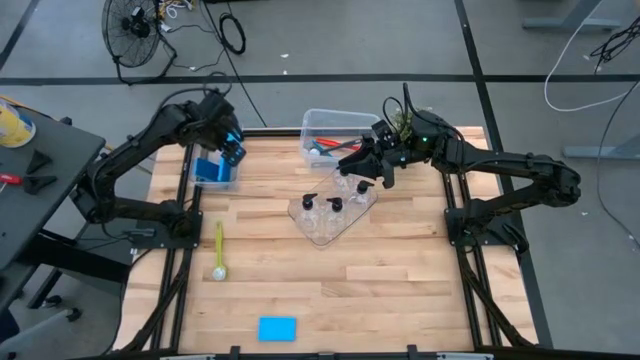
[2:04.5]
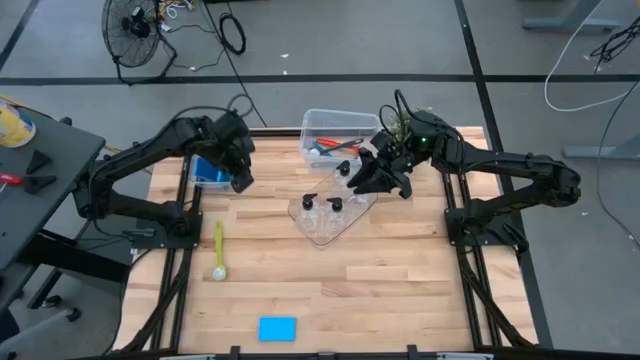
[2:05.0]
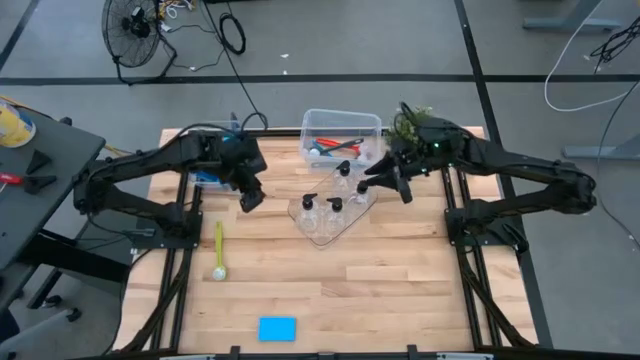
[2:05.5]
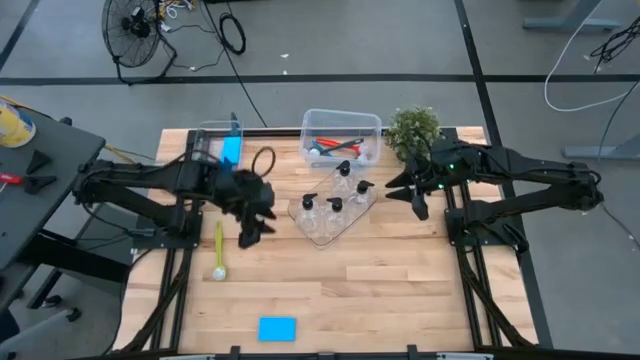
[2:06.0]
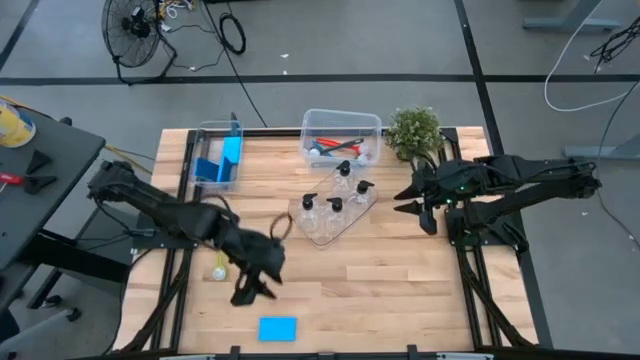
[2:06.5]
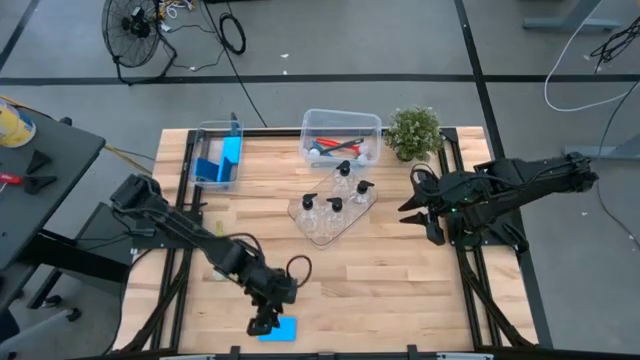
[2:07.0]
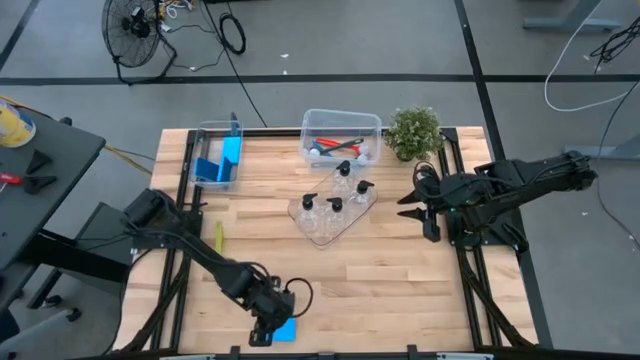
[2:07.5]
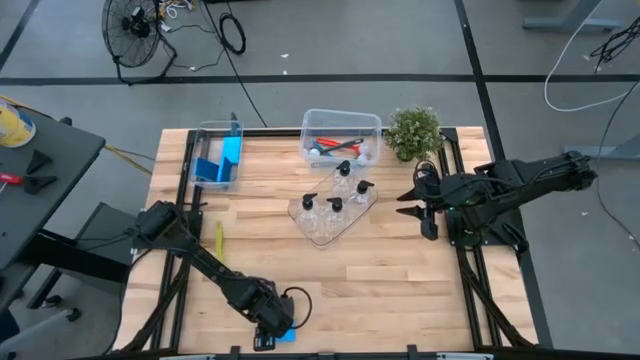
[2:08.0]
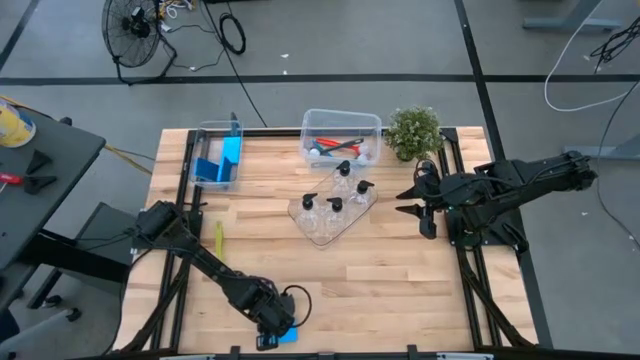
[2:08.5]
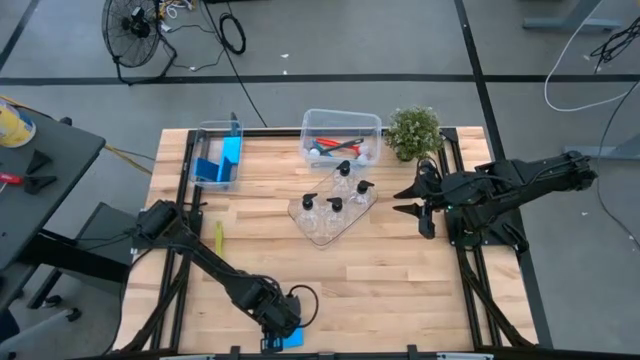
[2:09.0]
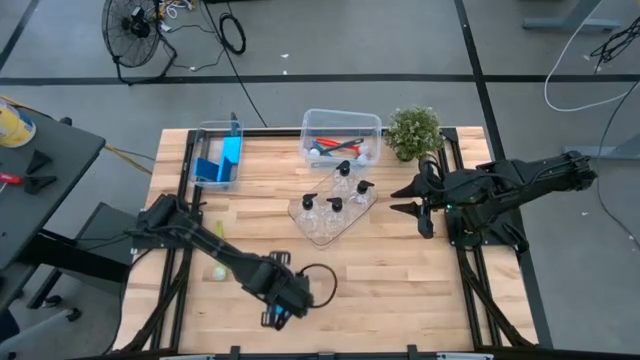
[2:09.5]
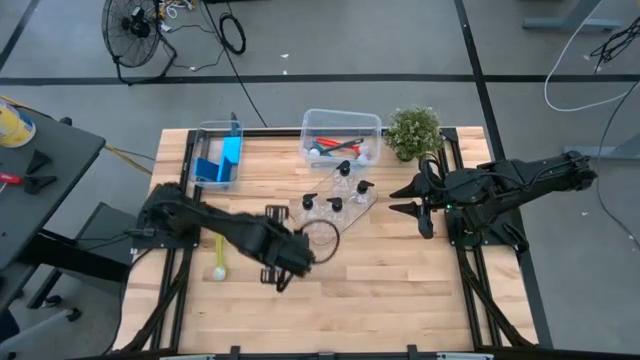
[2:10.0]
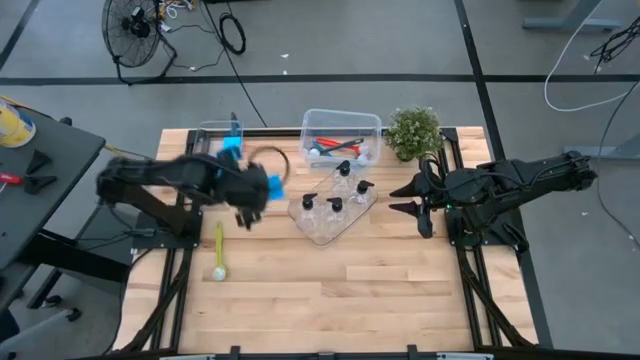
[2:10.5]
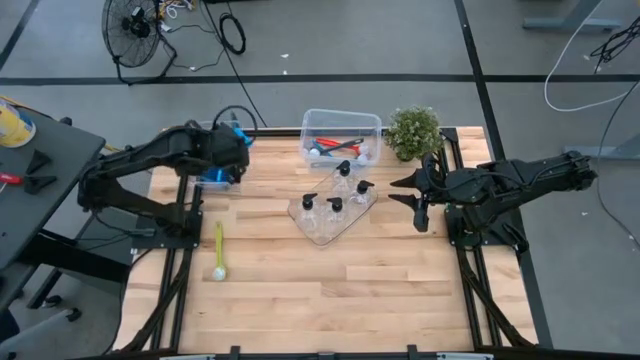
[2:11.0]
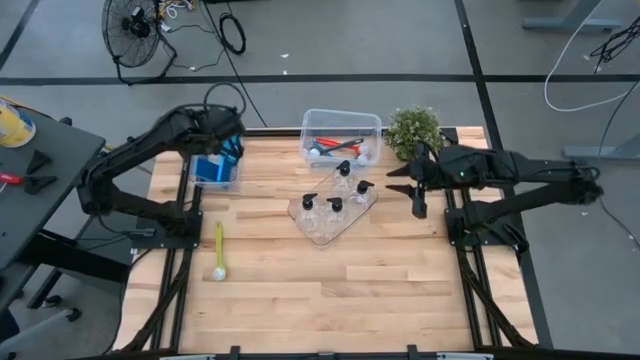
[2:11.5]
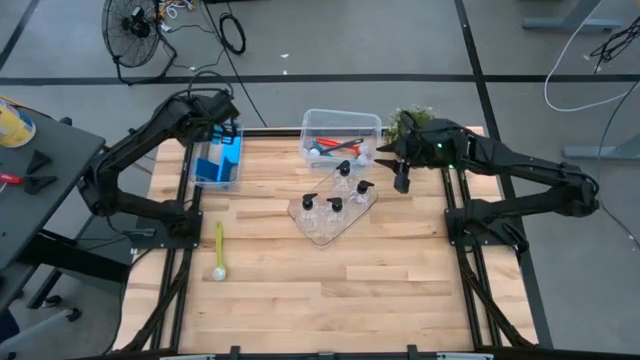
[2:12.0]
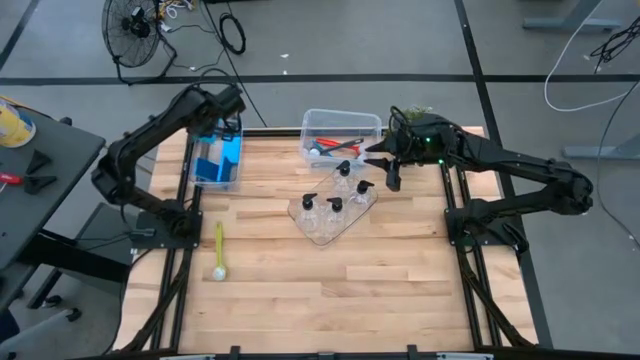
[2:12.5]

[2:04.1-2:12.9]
Task: Pick & Place Kitchen Sink Supplies
Put the blue sponge wipe into the left transparent bin

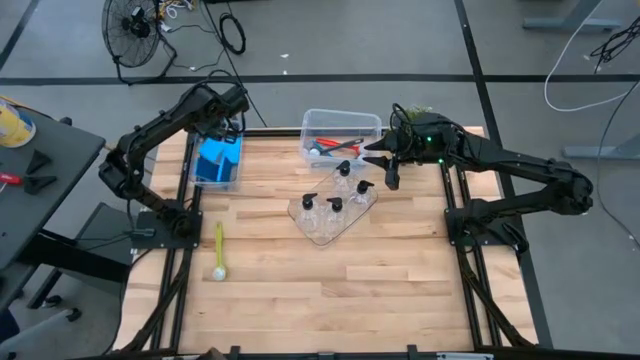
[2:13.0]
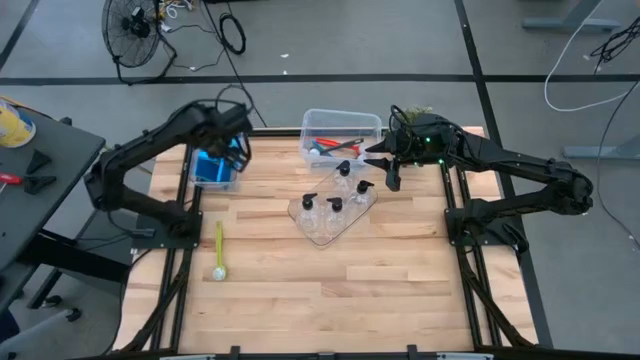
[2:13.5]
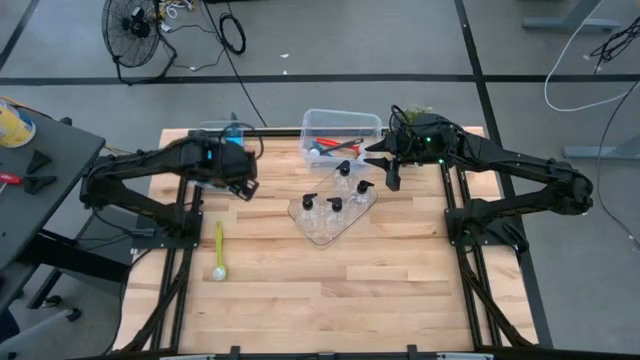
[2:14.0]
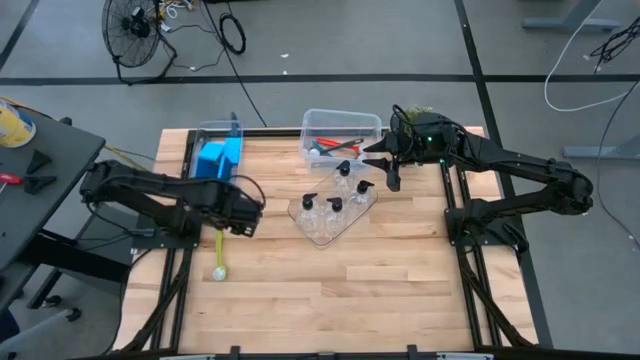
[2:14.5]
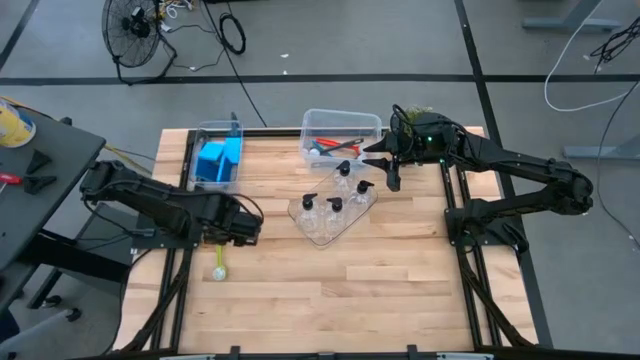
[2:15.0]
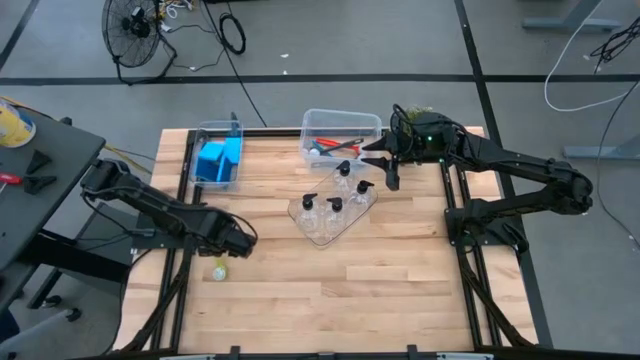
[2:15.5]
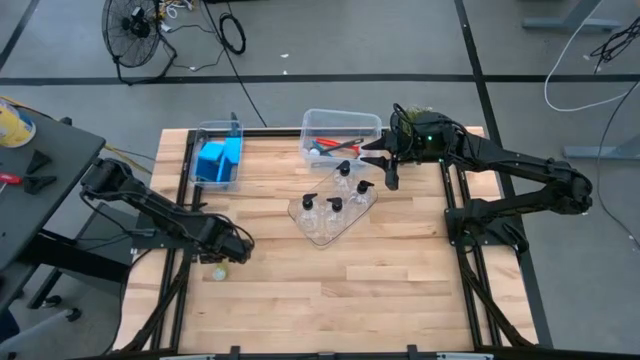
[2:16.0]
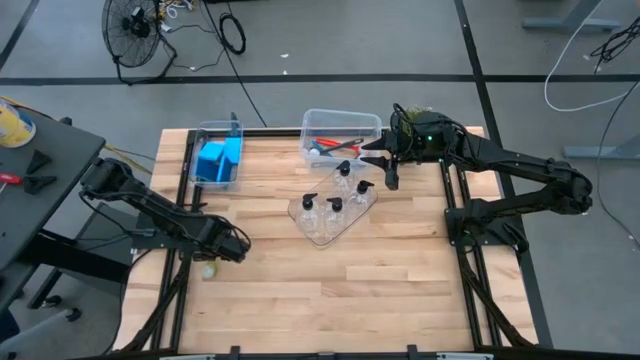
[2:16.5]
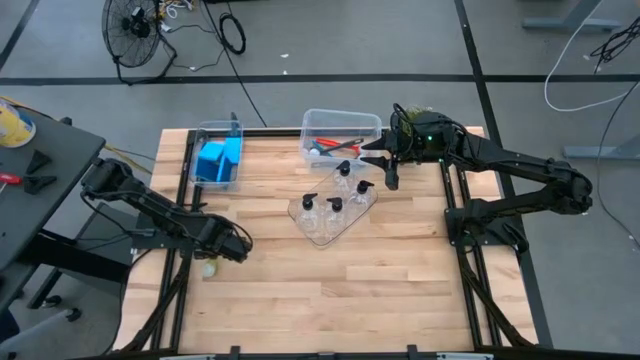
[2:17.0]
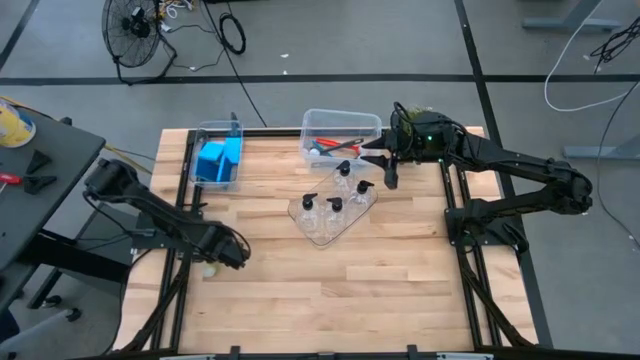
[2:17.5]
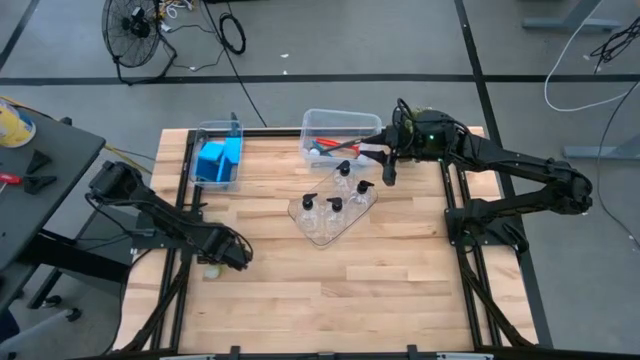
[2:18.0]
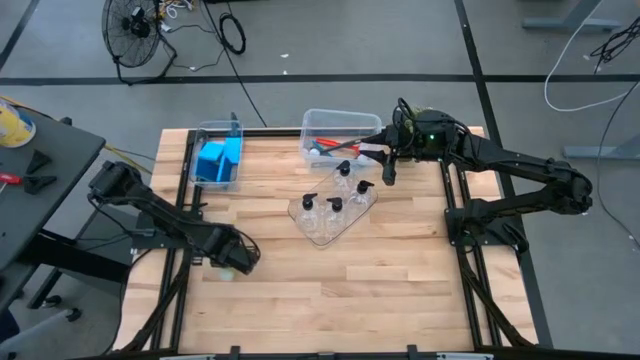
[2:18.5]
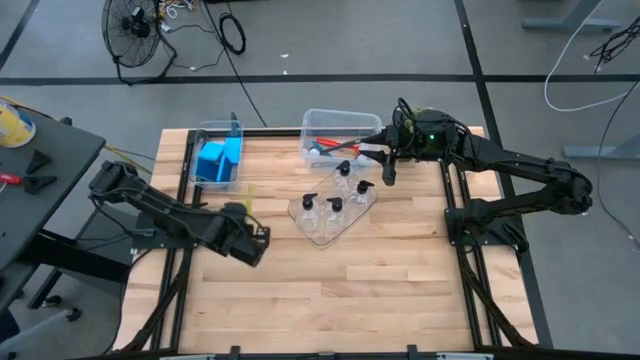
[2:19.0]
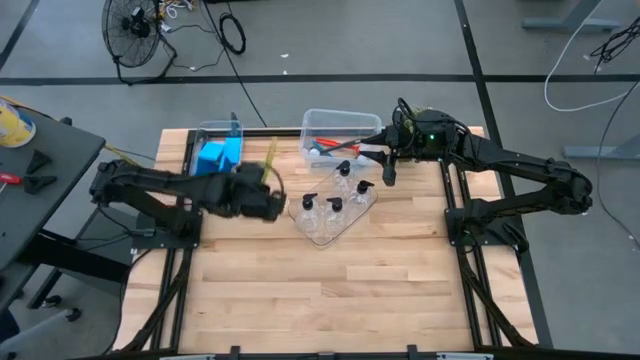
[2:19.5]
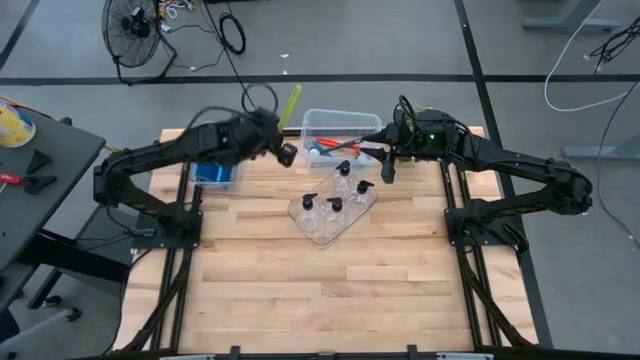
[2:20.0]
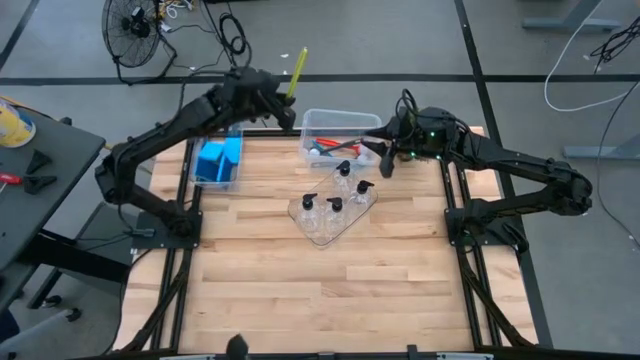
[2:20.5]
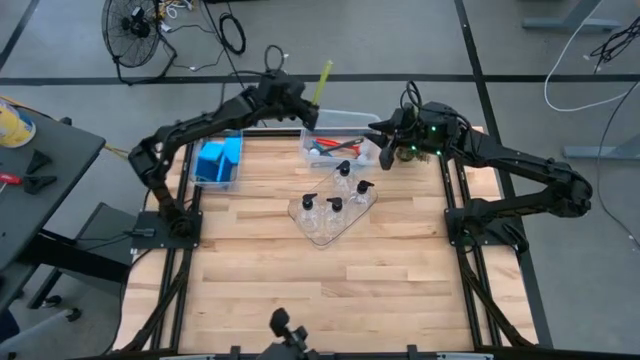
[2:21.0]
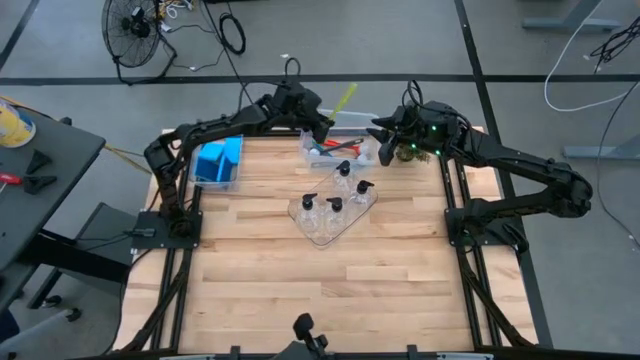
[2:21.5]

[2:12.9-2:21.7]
Put the green dishwashing brush into the right transparent bin

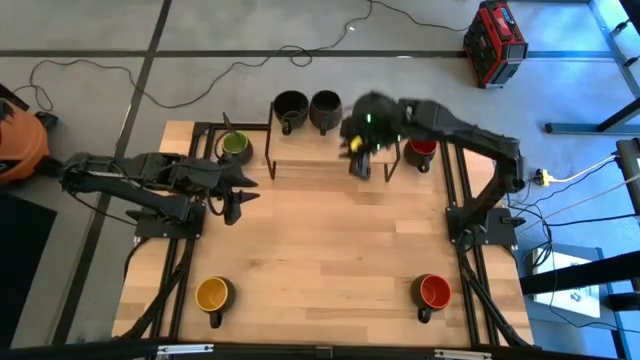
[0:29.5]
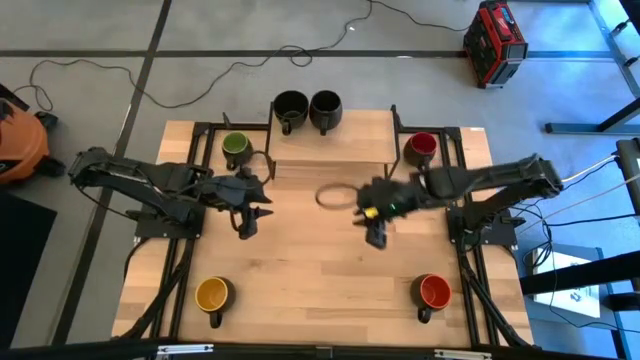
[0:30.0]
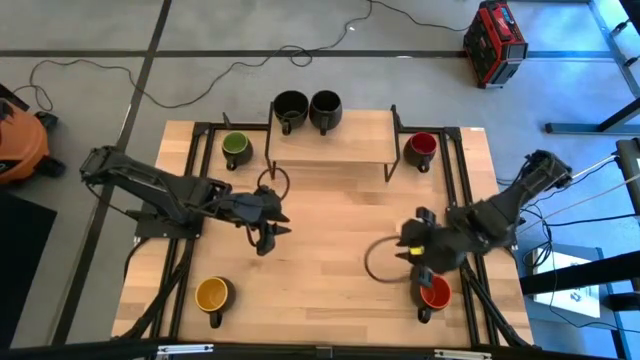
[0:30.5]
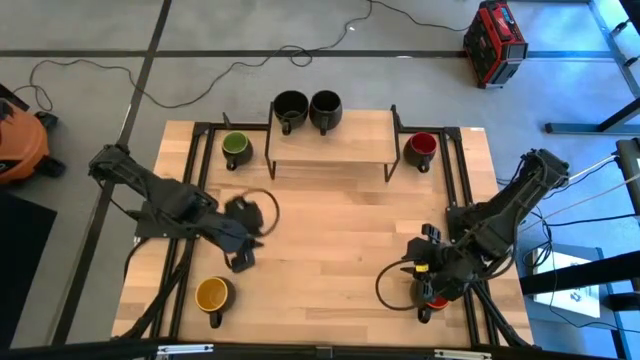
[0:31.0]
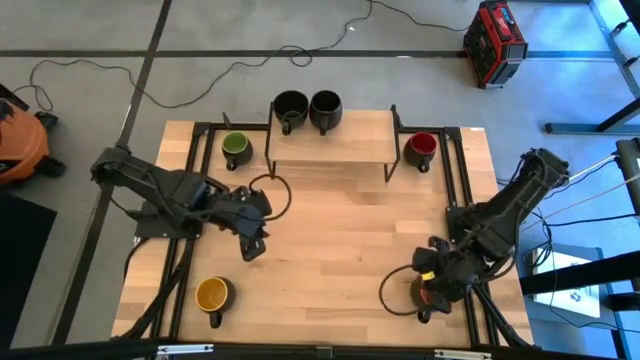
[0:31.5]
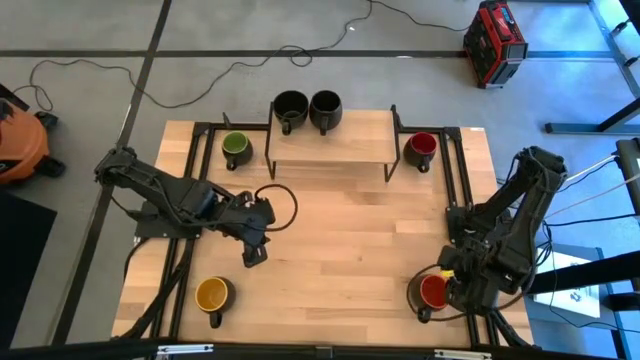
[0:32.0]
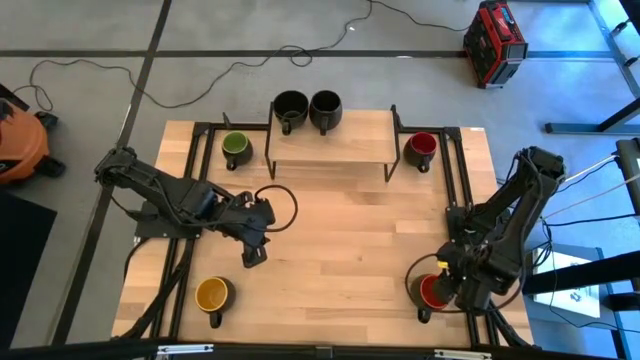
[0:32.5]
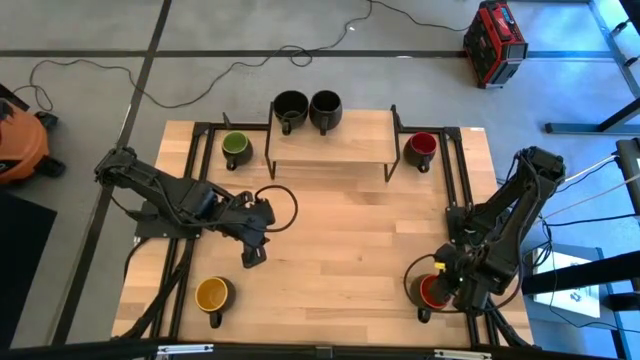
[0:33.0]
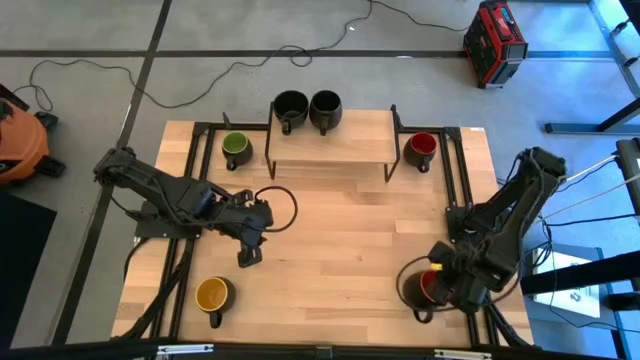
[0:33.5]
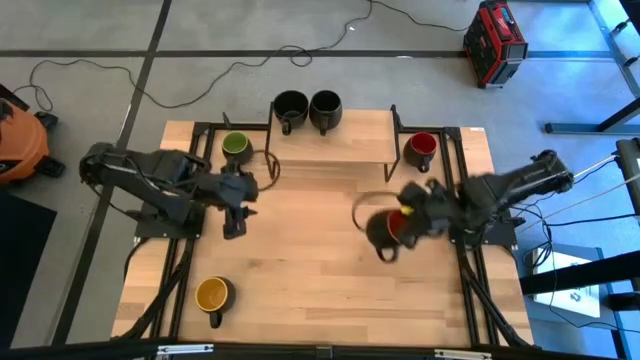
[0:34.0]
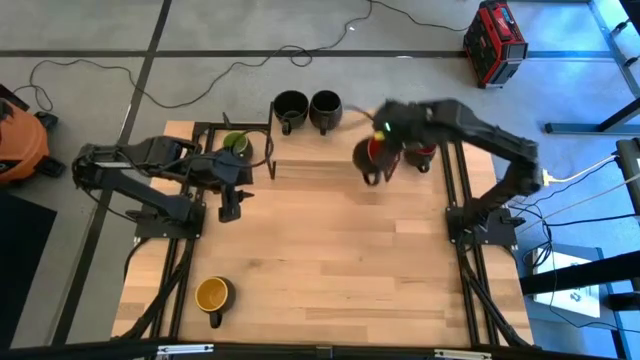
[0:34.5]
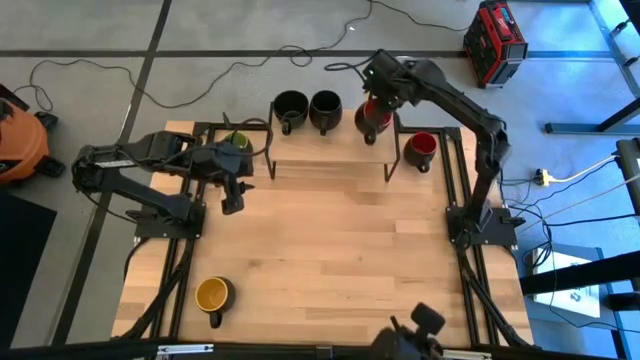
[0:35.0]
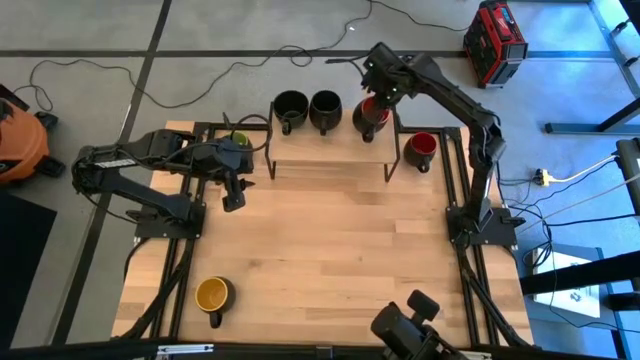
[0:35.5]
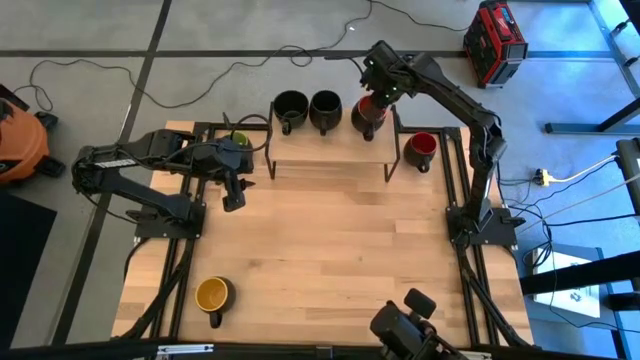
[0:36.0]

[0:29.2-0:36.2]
Task: Place coffee mugs
Put the bottom right orange mug on the shelf
